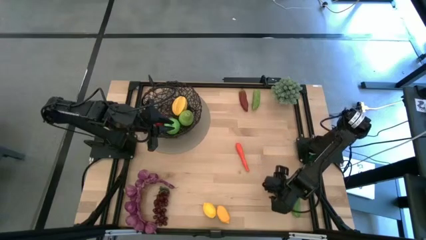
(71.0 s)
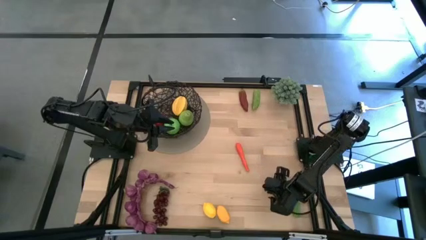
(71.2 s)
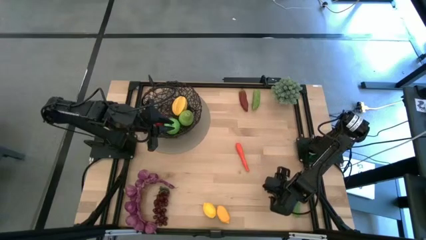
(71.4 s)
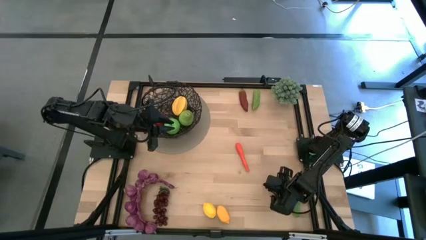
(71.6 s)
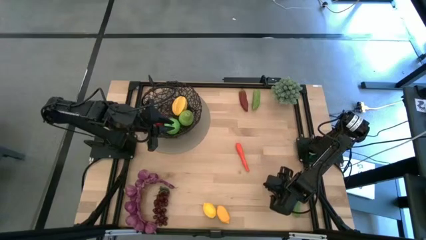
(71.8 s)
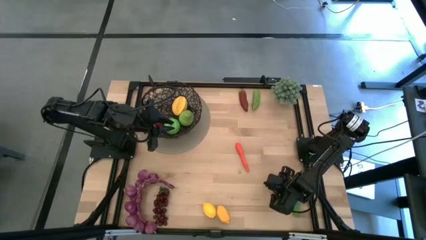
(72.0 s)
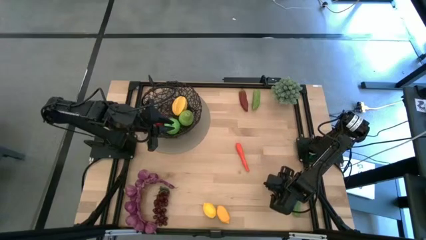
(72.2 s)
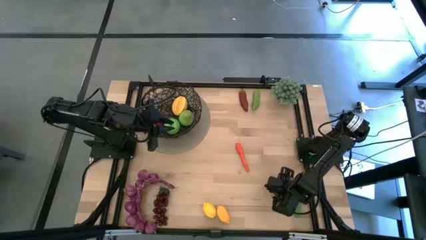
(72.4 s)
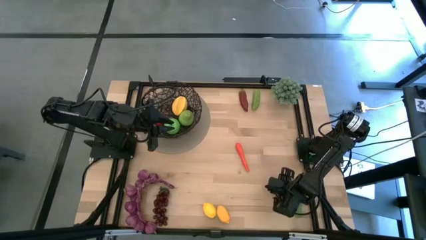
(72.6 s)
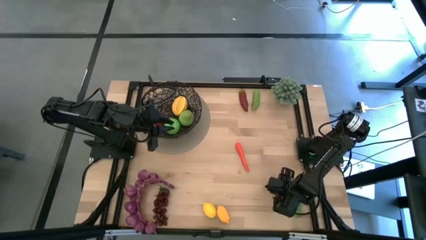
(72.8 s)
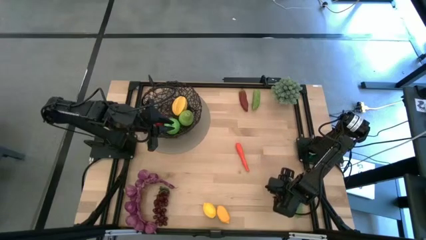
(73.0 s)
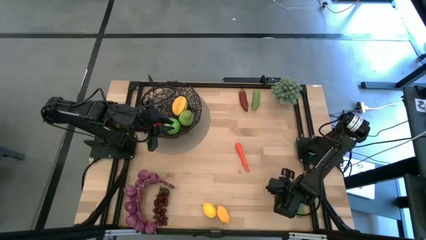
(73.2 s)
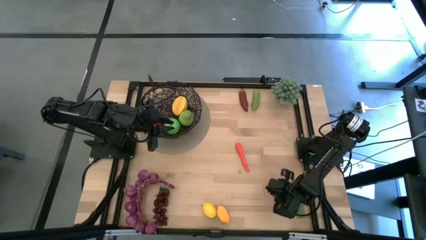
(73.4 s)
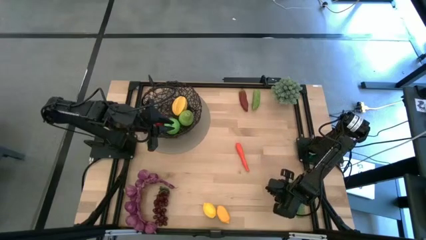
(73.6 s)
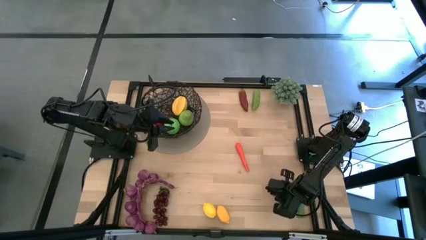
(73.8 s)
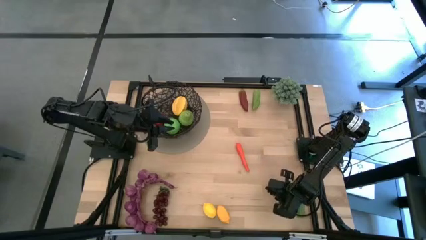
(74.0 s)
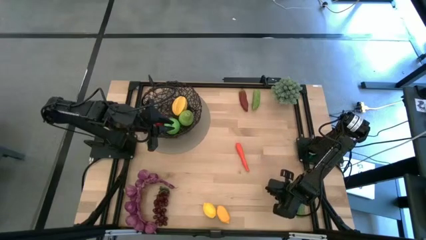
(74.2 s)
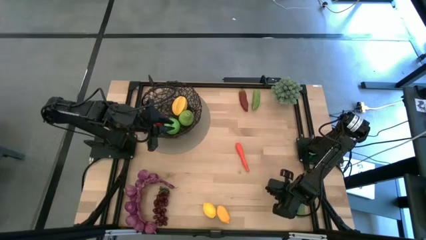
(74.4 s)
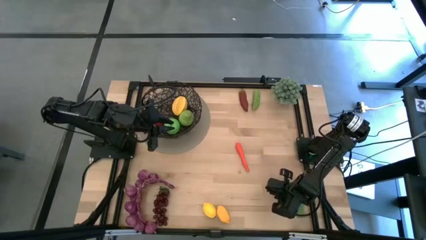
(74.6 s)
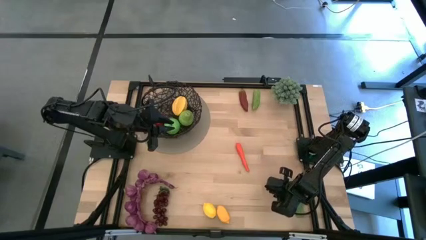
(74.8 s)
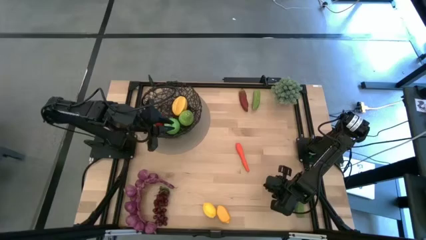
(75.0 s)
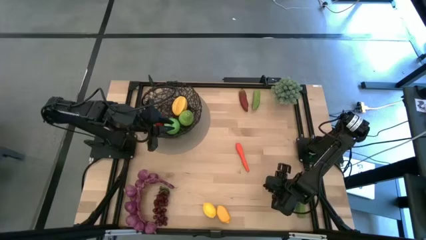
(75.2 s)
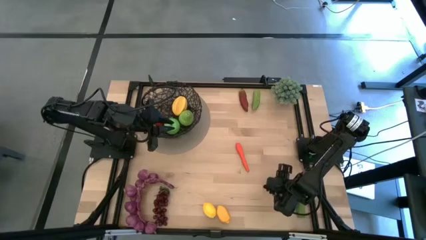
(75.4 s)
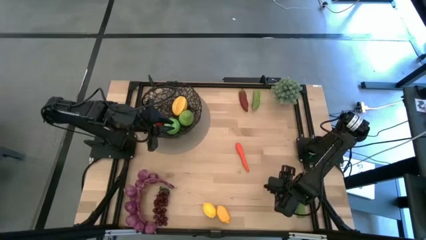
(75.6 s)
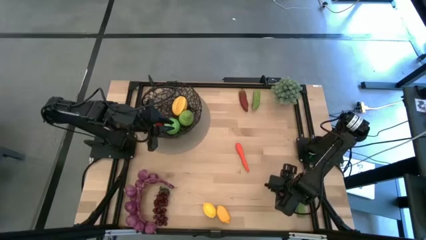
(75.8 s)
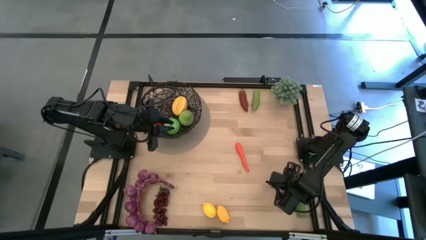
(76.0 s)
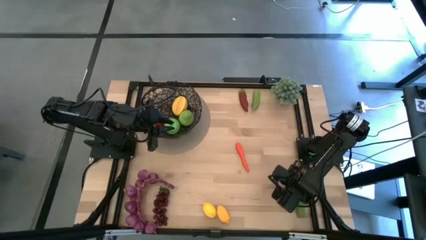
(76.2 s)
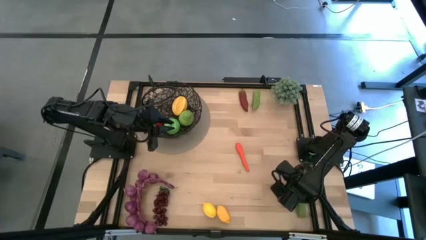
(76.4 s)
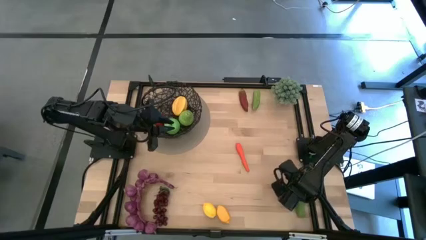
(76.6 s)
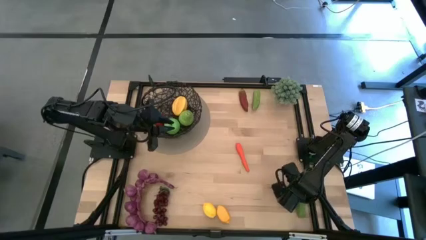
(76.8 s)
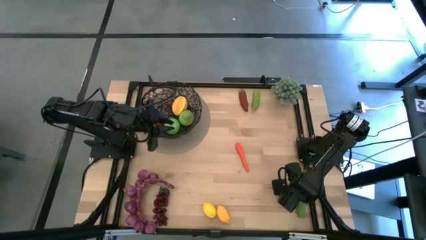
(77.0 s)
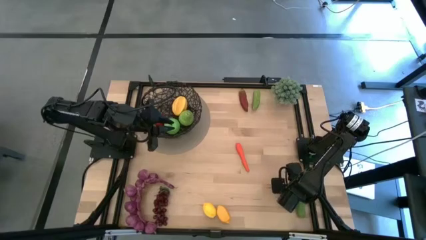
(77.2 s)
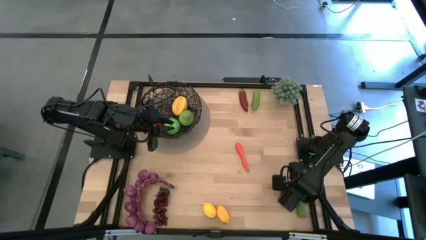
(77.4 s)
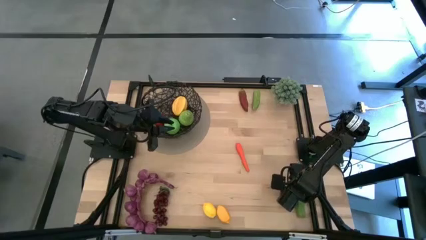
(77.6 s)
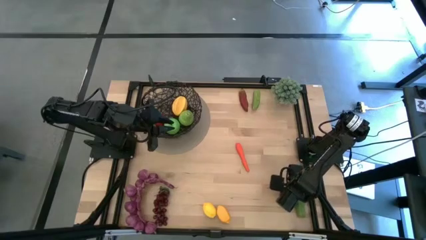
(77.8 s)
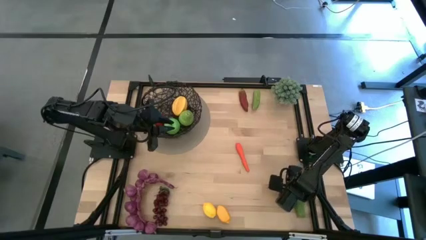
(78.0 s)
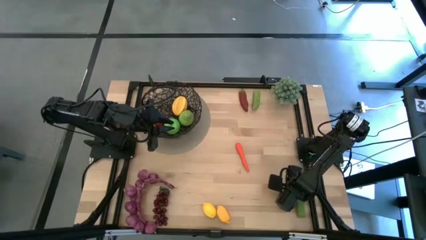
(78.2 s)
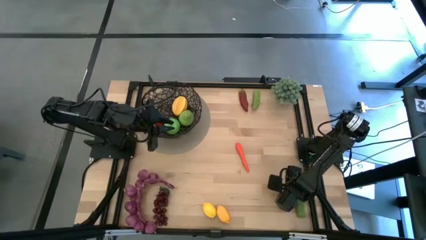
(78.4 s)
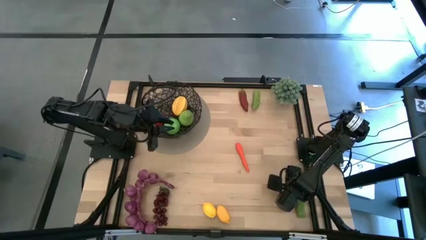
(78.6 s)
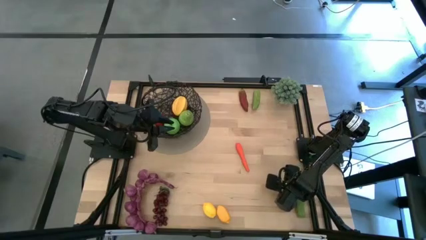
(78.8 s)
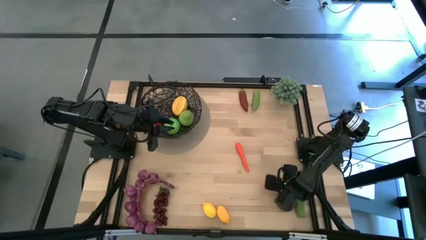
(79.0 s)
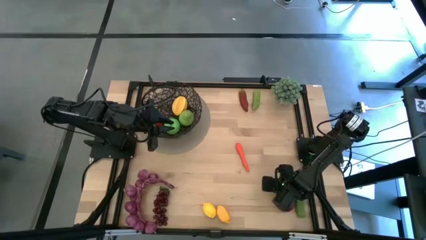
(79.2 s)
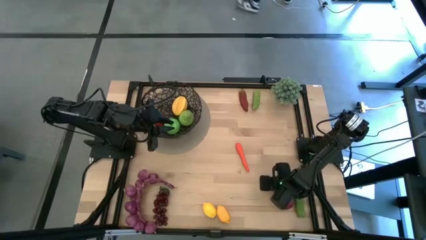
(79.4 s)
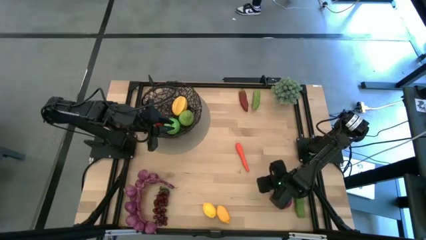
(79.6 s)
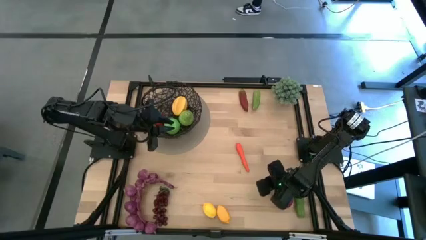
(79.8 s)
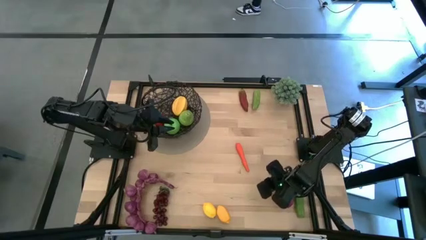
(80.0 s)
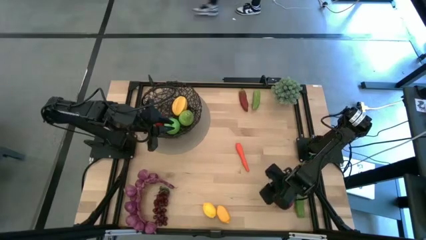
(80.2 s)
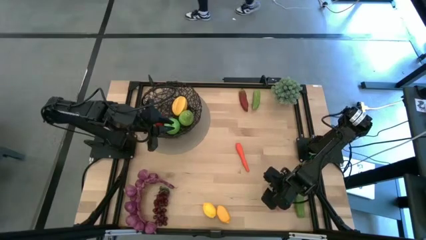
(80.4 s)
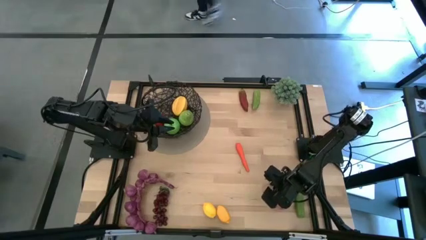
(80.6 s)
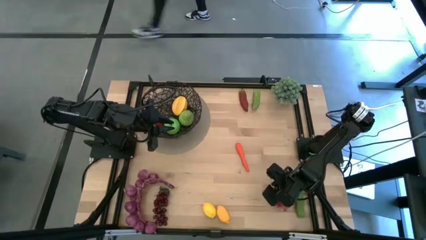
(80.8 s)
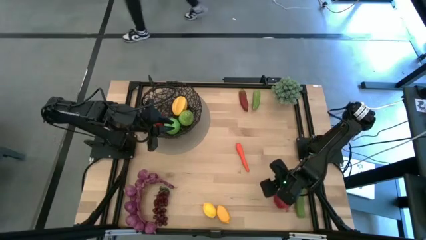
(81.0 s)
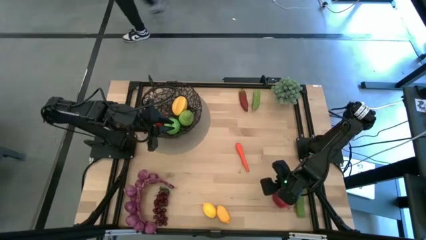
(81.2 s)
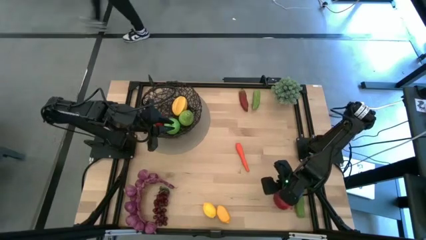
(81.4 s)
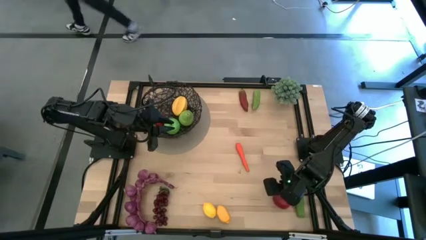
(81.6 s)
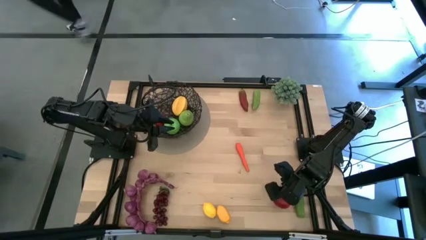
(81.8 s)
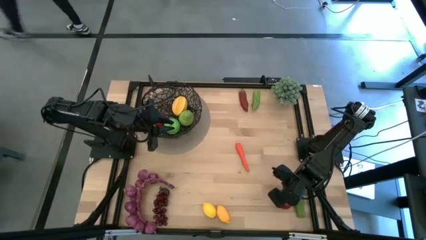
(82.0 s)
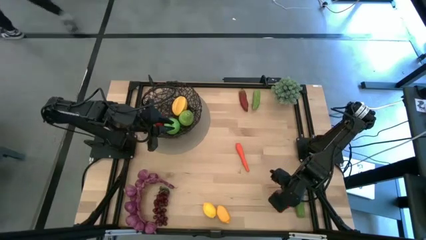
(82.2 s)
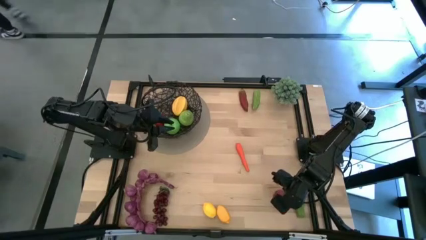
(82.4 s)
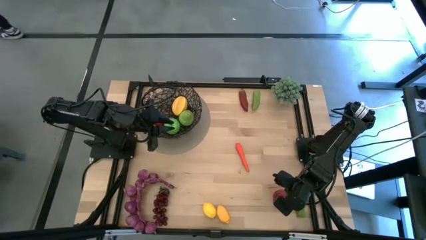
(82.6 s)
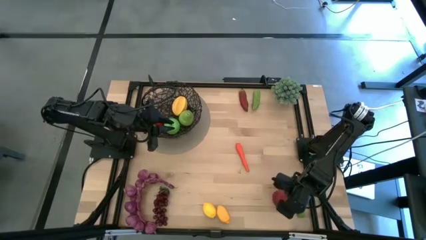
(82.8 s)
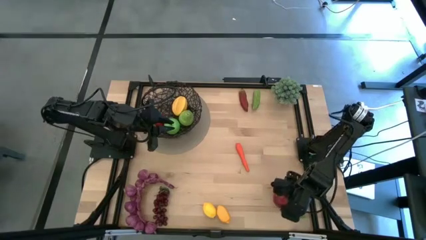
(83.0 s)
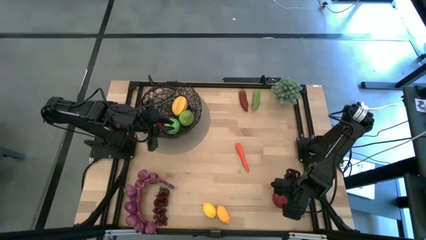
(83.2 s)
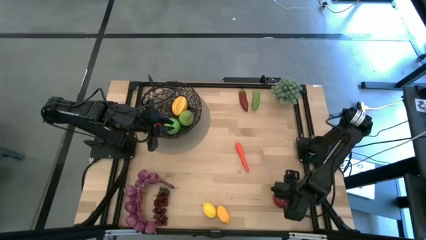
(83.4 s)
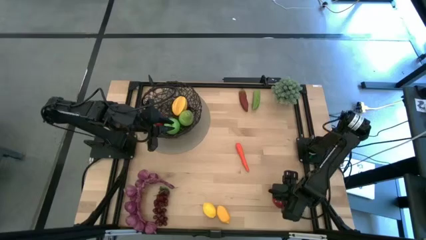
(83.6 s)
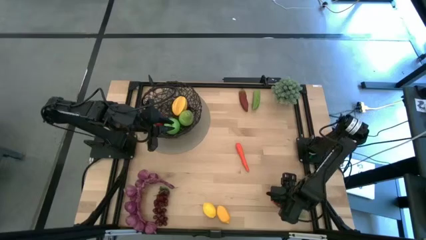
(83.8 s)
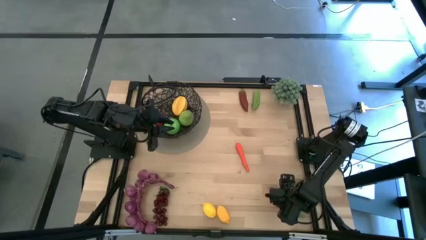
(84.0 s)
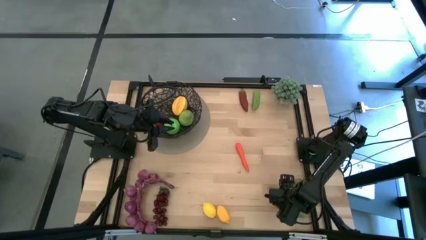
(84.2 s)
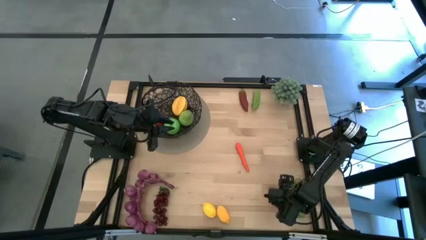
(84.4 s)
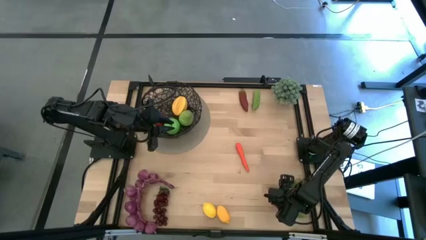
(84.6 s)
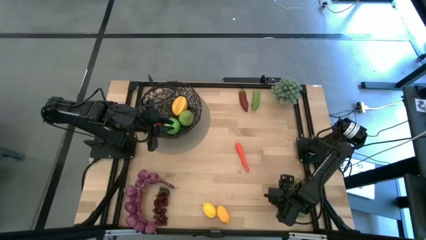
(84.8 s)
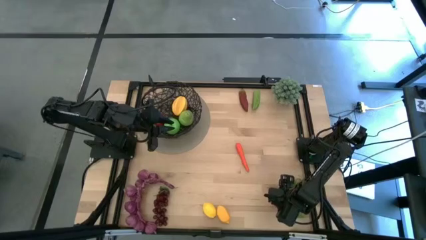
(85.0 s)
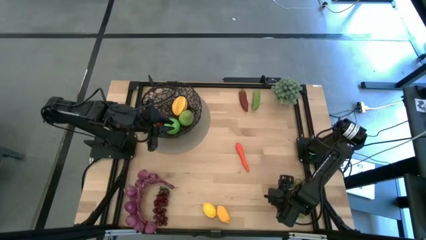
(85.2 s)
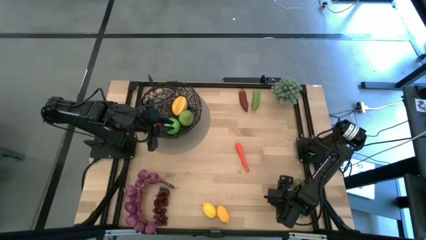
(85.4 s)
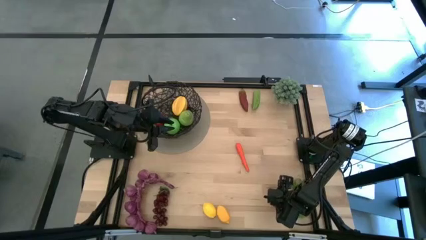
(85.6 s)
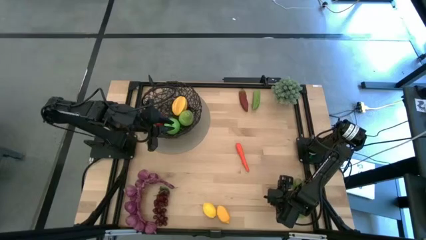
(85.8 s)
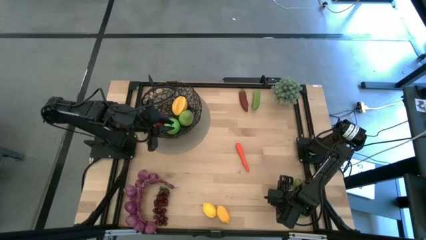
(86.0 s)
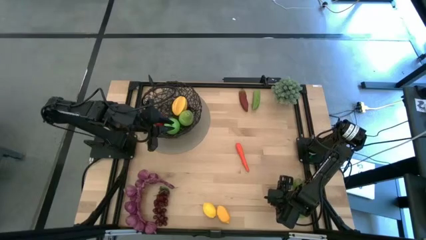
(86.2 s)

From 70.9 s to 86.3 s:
Task: Build produce basket
Put the red pomegranate into the black wire basket
